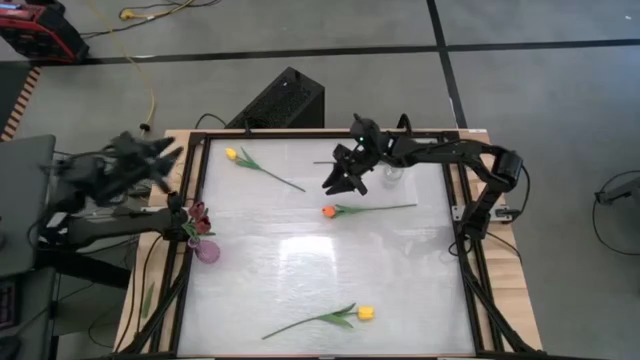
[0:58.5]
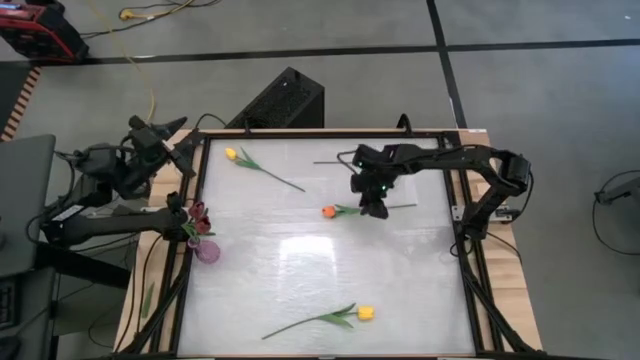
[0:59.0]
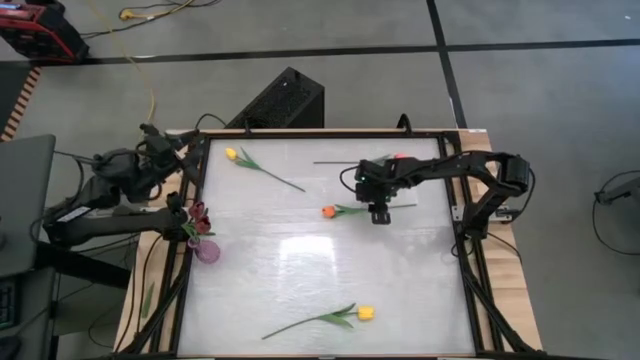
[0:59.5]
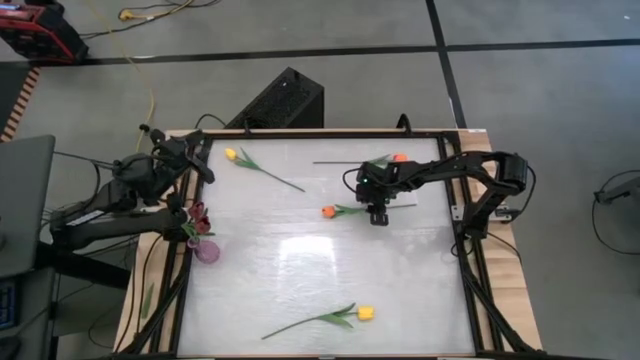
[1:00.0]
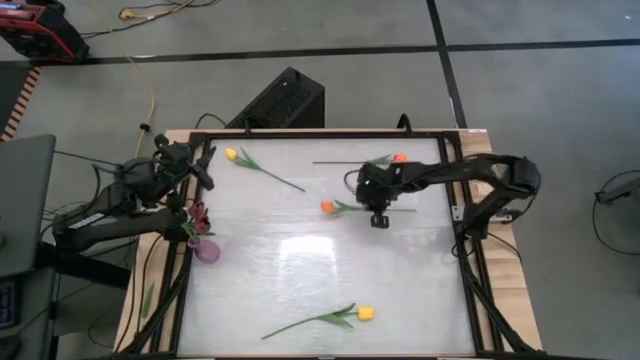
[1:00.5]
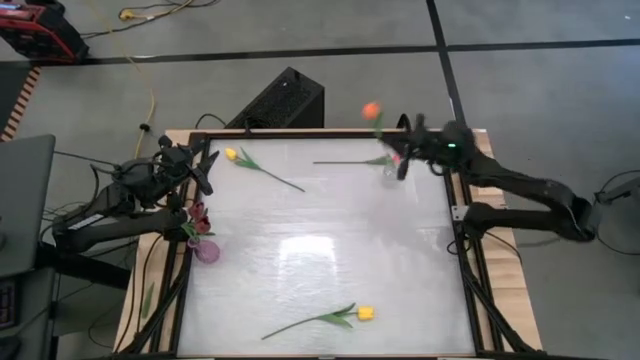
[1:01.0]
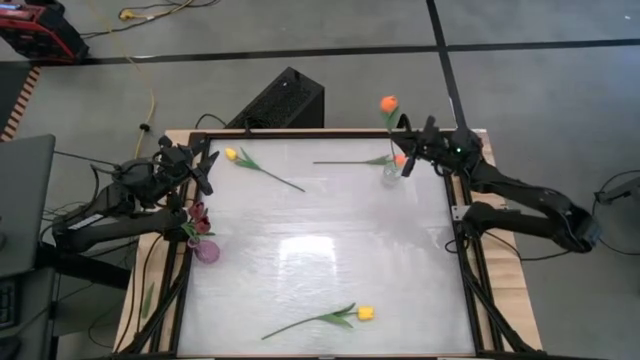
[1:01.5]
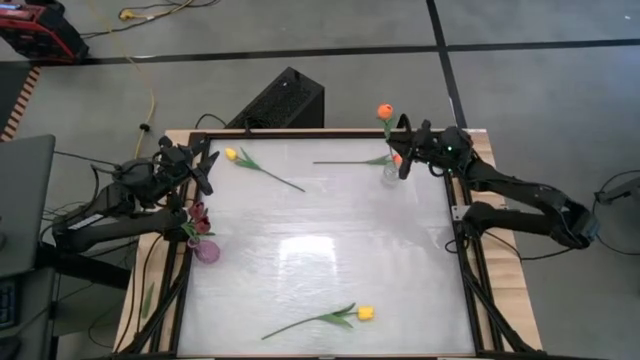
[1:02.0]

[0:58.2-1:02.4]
Task: Sort flowers into vase by color
Put the bottom orange tulip into the transparent vase

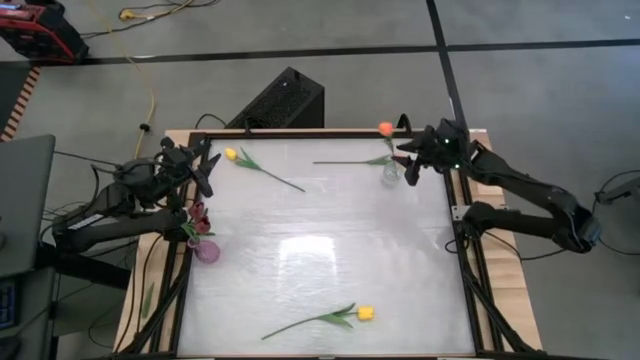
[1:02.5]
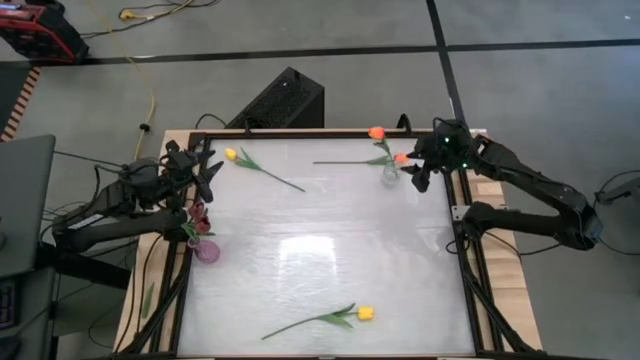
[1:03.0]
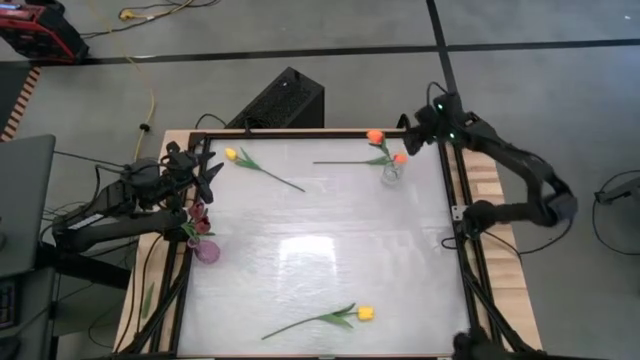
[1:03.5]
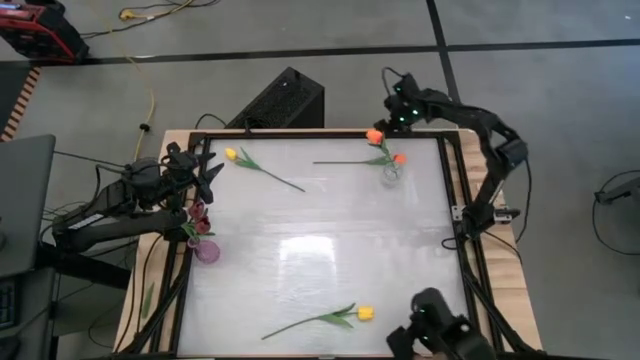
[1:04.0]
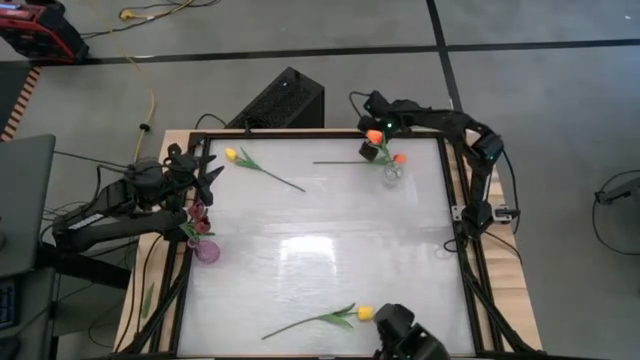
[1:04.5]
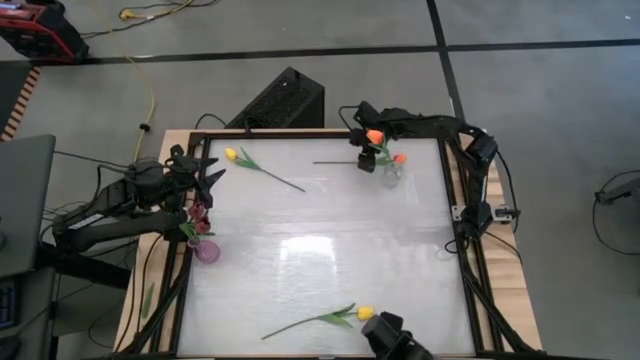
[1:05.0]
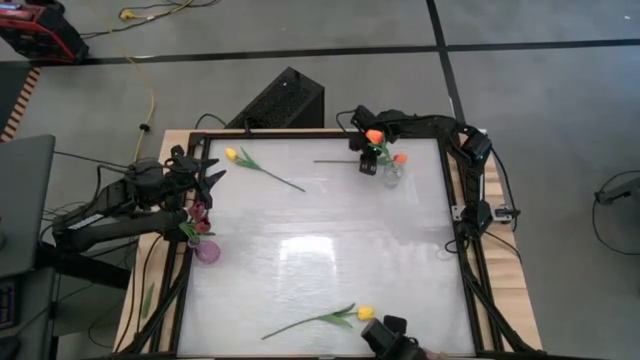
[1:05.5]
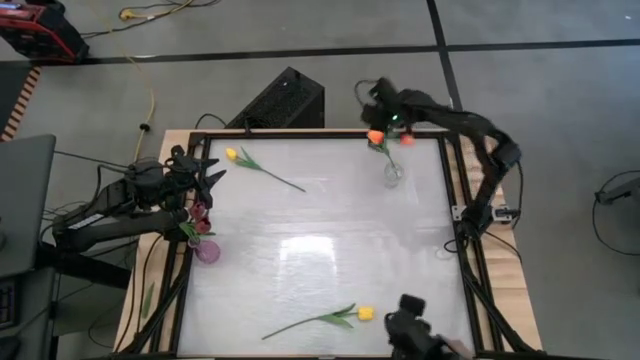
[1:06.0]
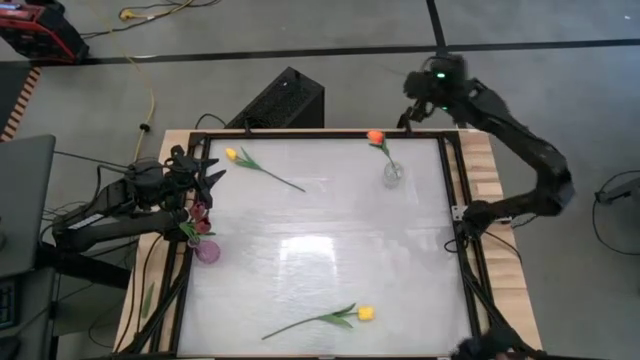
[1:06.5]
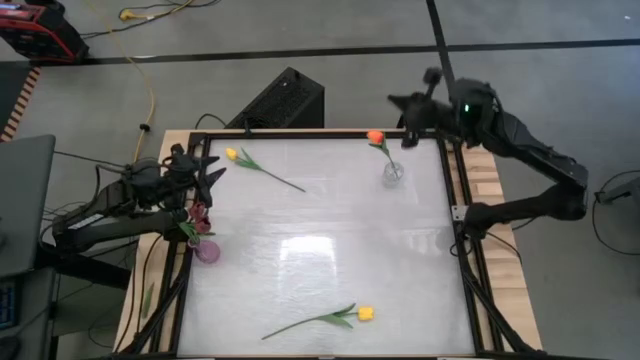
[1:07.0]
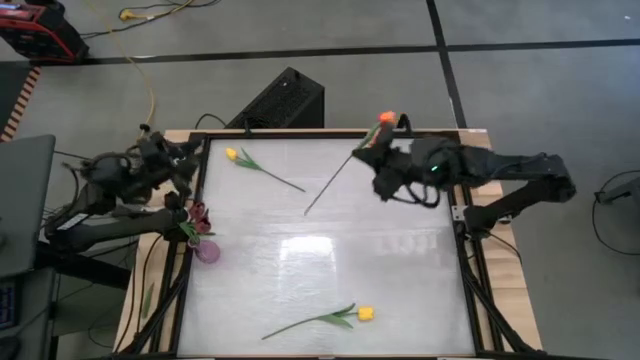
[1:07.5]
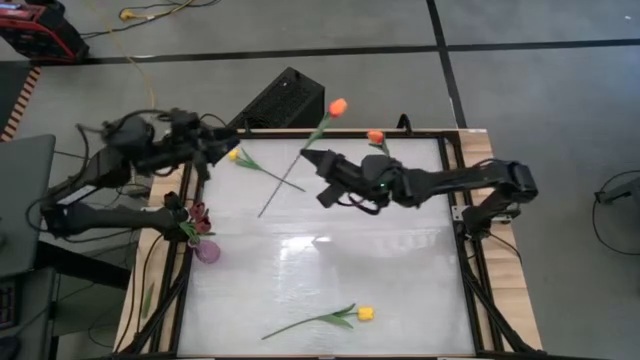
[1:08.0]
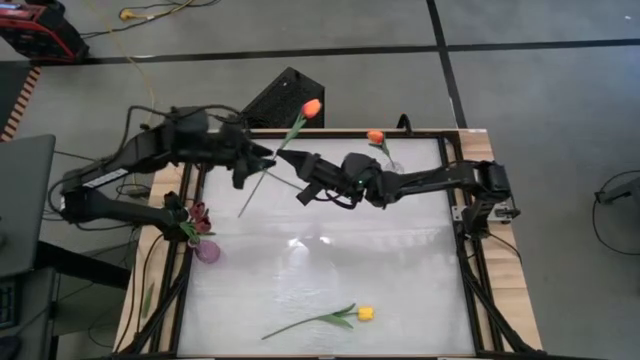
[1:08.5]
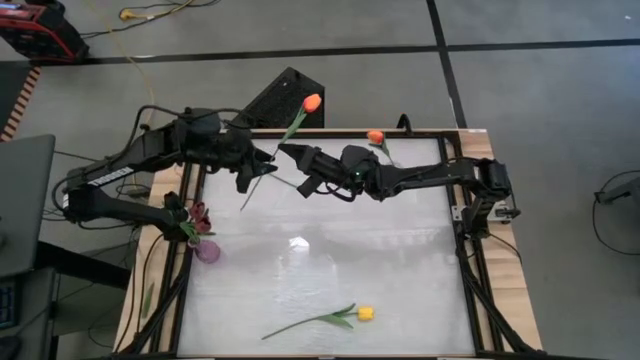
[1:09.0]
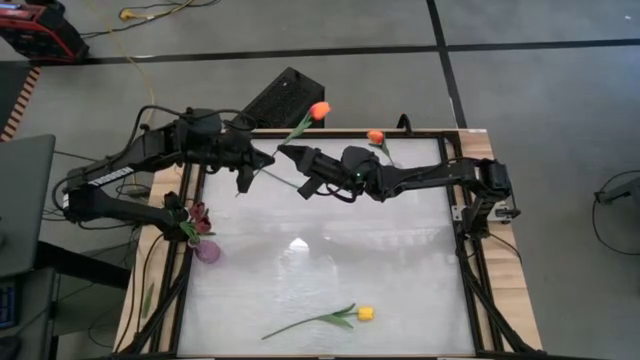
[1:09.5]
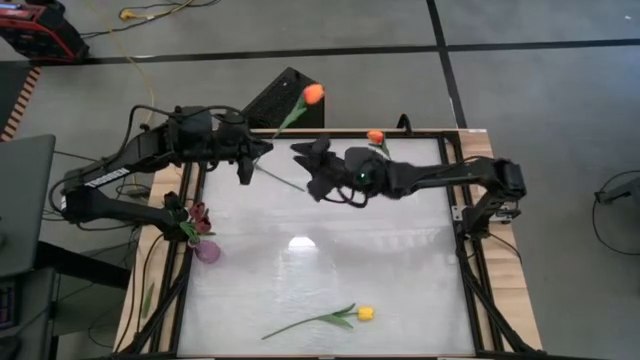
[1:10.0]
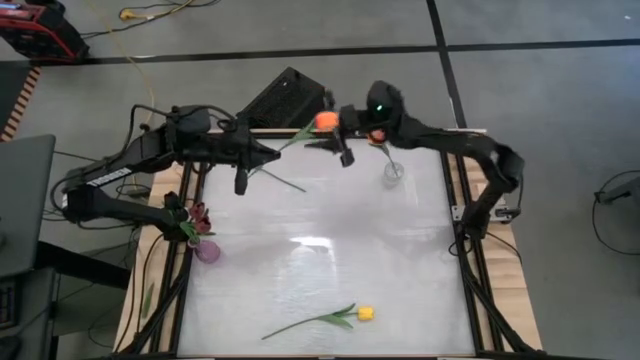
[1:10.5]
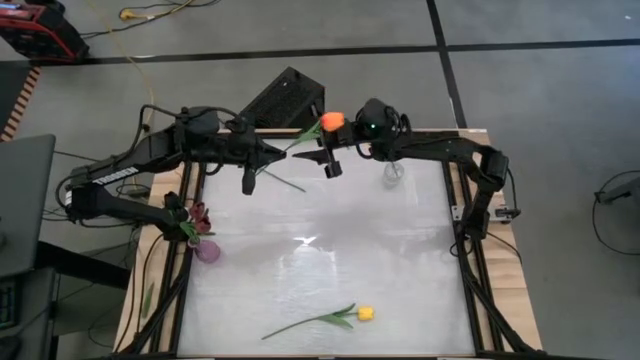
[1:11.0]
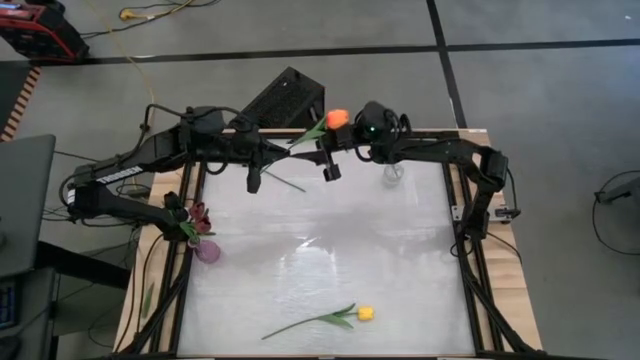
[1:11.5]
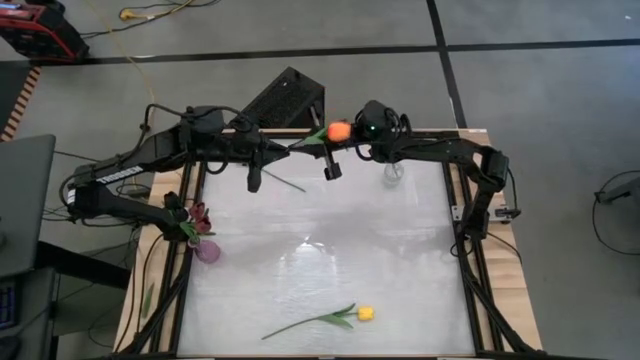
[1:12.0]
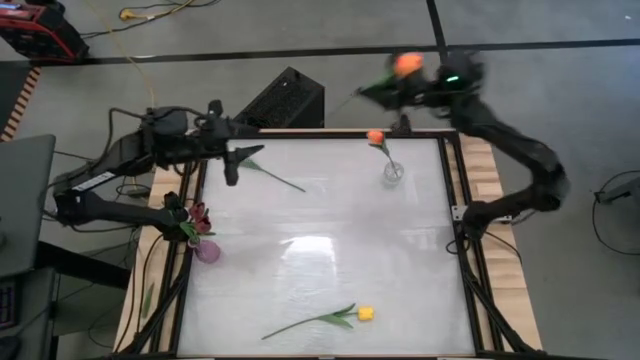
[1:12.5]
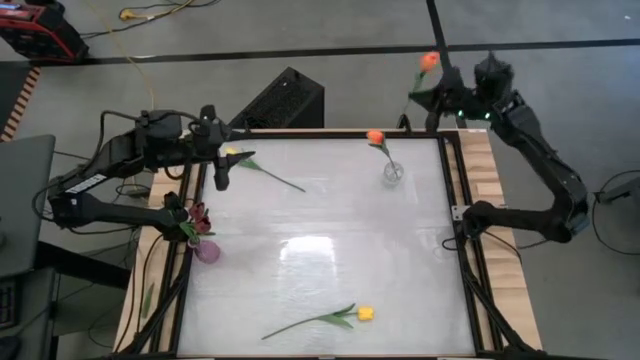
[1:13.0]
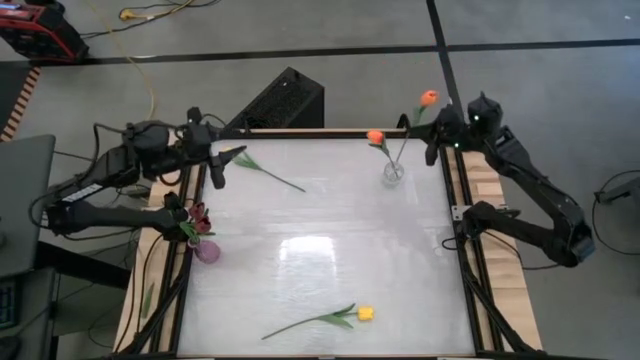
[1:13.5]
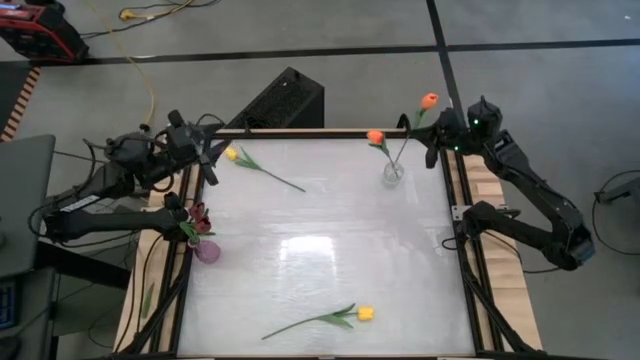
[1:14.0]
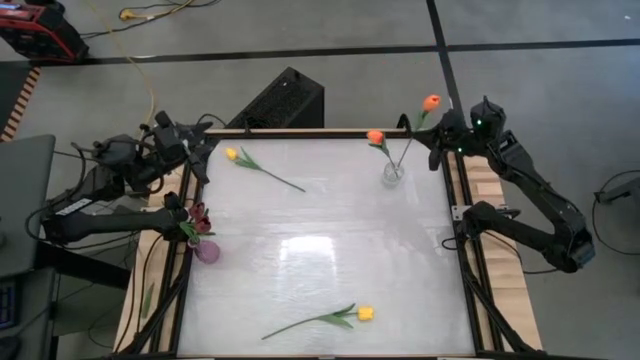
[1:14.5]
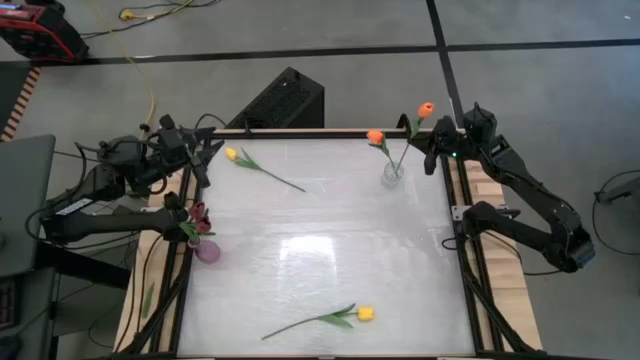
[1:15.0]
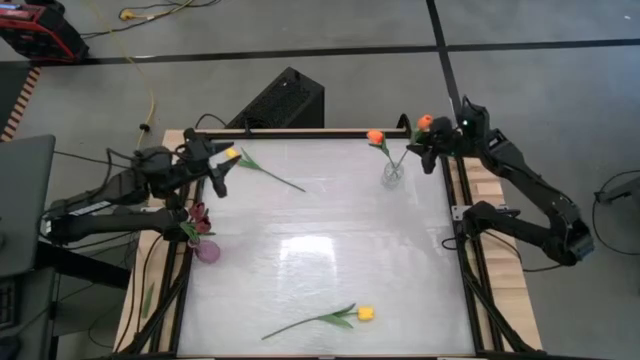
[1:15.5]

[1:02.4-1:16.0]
Put the orange tulip into the transparent vase

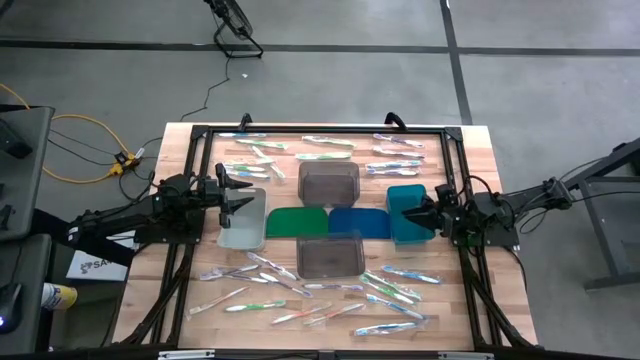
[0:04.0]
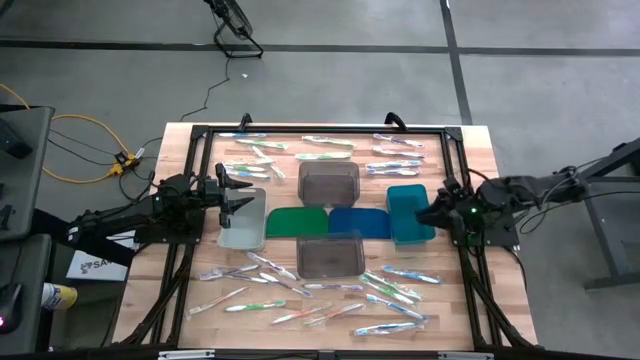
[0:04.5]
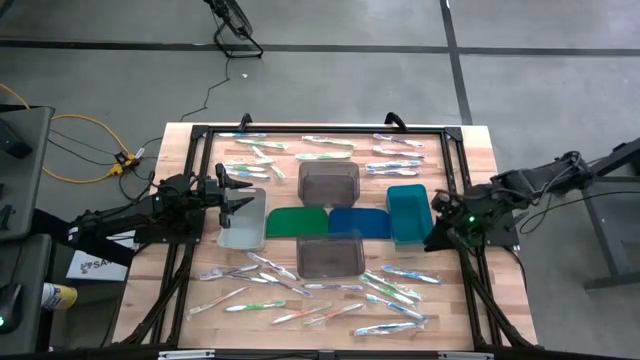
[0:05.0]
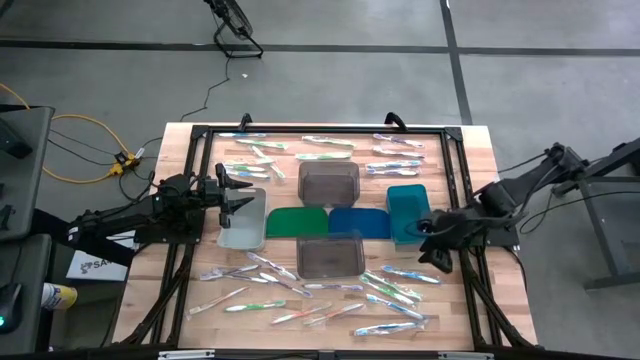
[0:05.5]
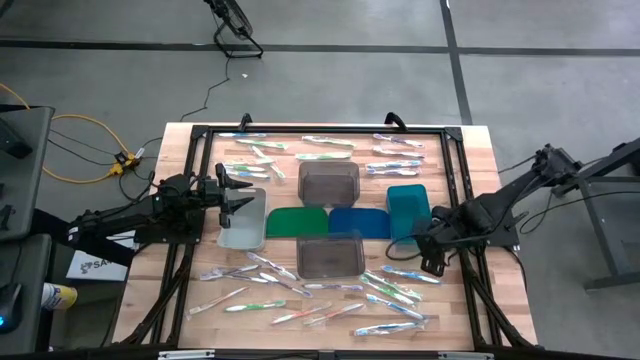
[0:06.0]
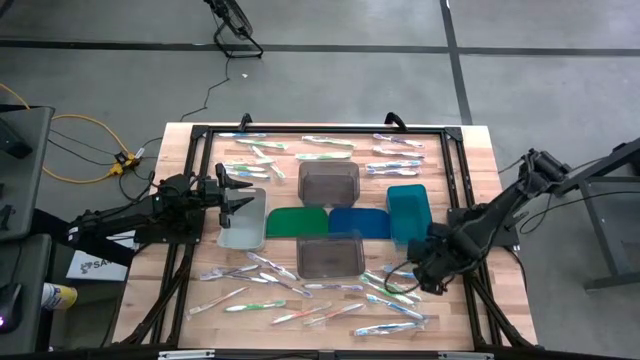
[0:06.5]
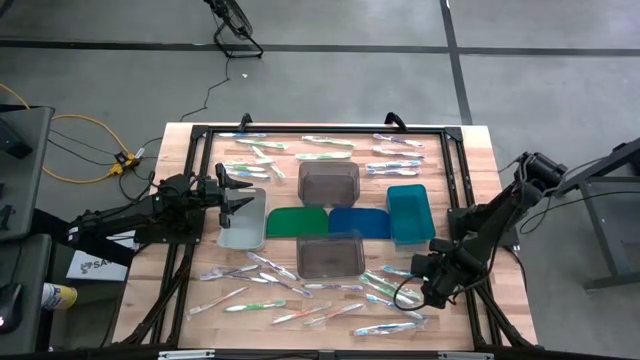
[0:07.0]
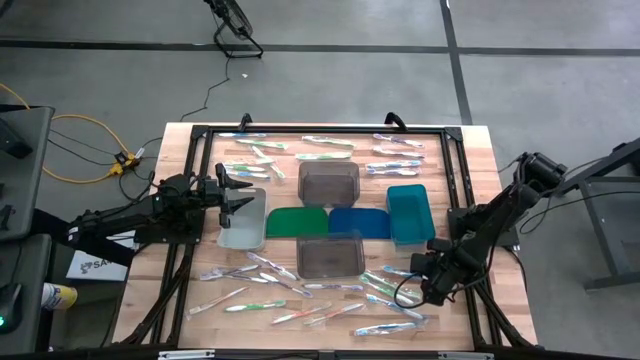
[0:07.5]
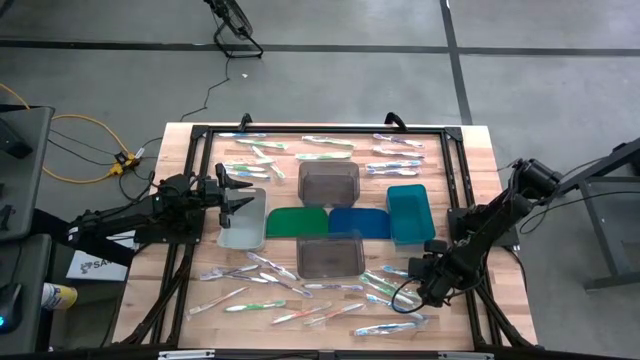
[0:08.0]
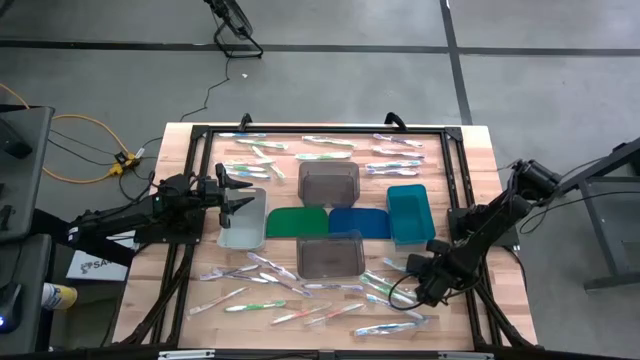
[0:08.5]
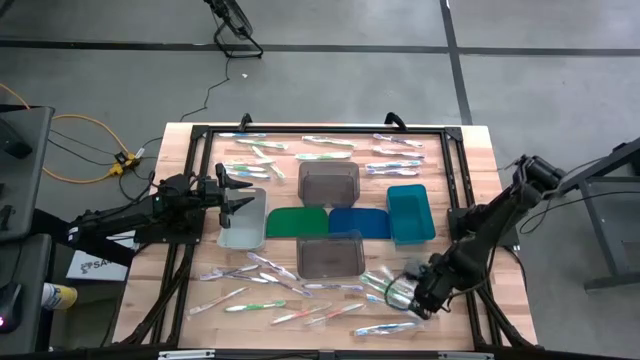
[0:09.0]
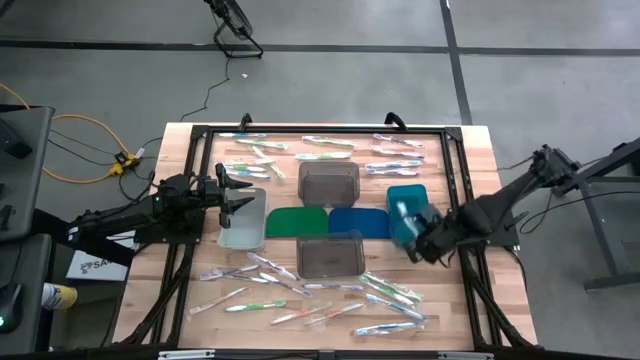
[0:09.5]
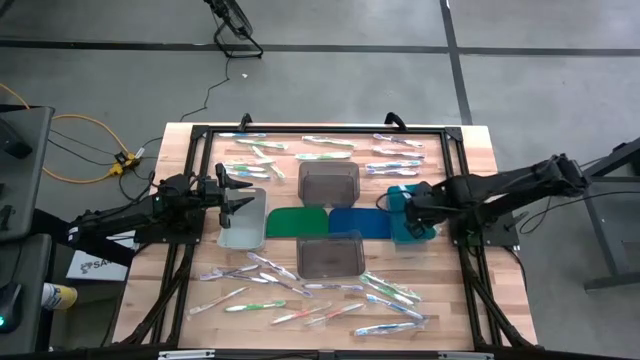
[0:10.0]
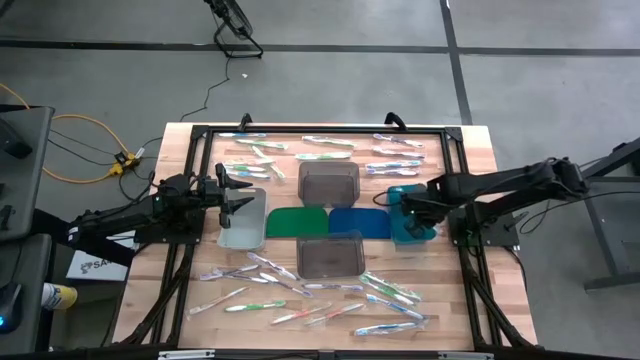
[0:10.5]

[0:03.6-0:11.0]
Task: Pick & Place Toothbrushes
Put the blue toothbrush into the blue bin
